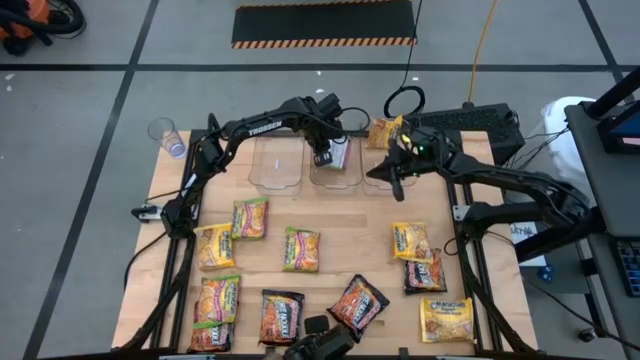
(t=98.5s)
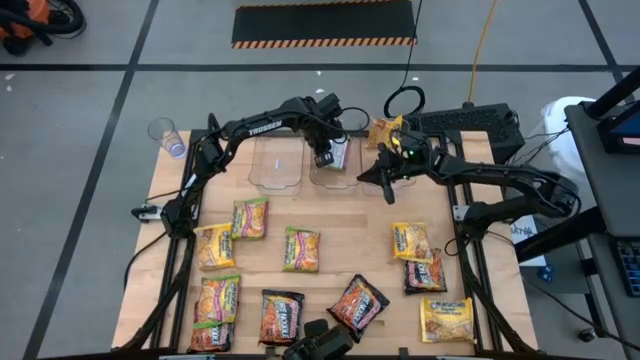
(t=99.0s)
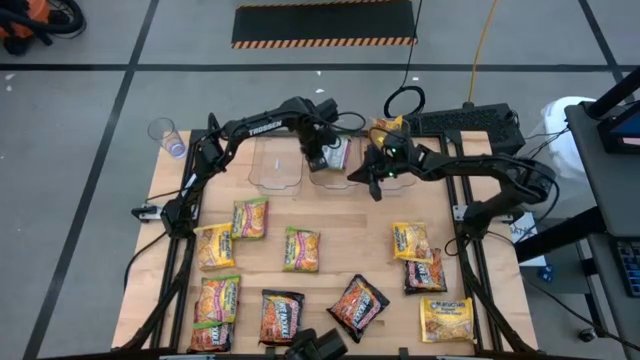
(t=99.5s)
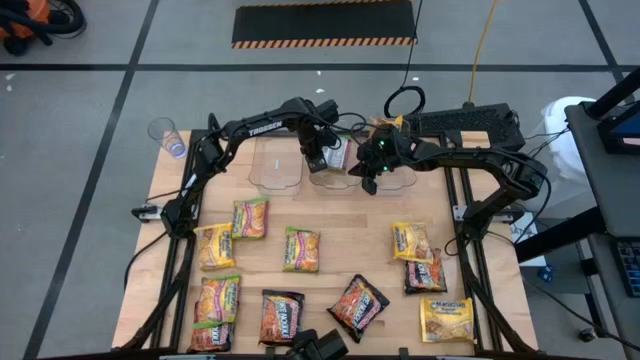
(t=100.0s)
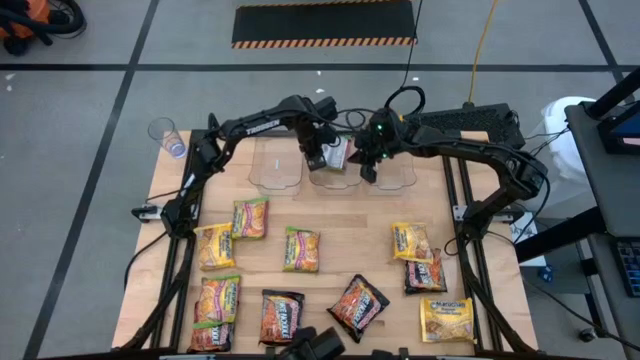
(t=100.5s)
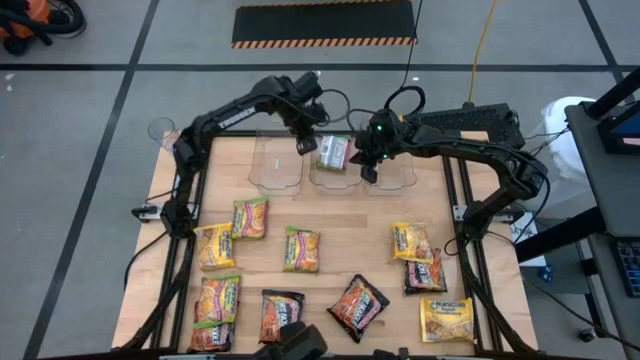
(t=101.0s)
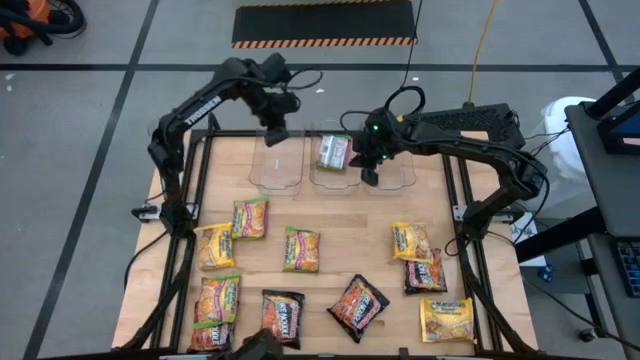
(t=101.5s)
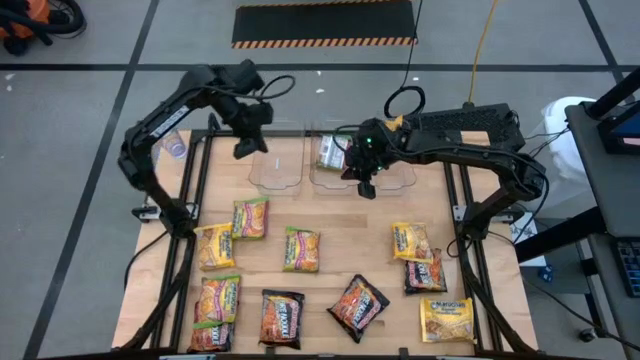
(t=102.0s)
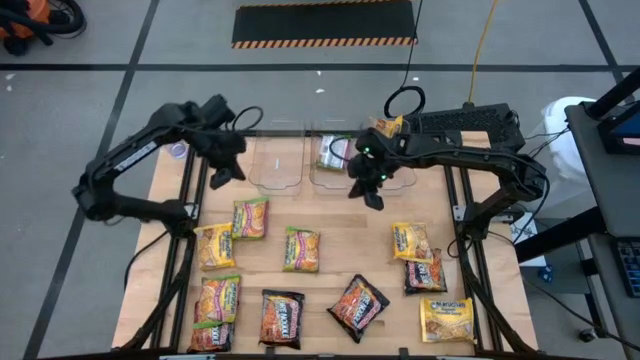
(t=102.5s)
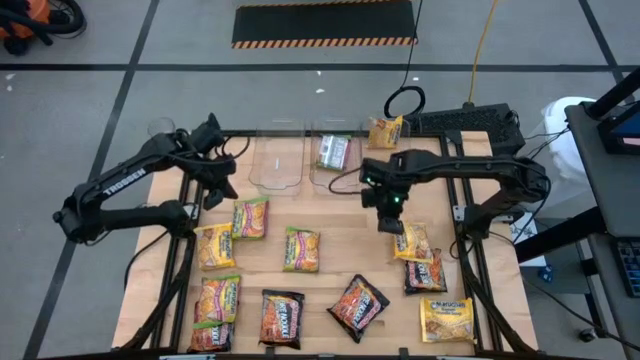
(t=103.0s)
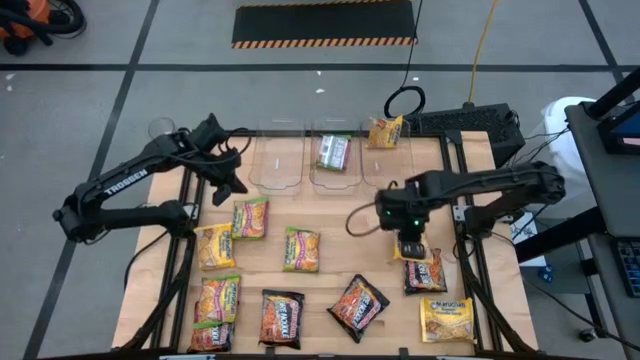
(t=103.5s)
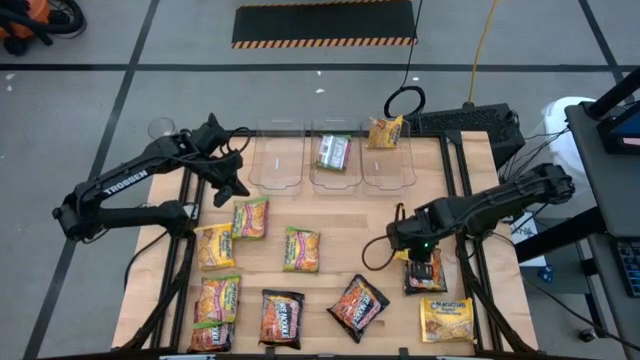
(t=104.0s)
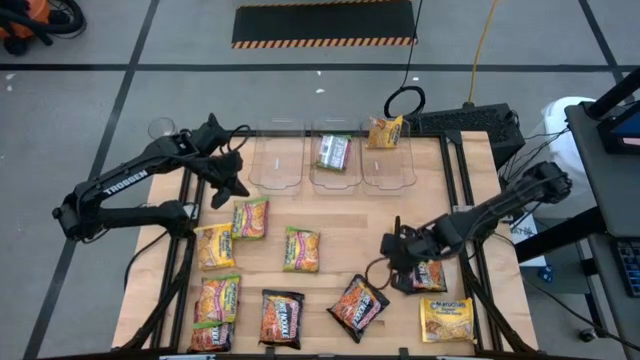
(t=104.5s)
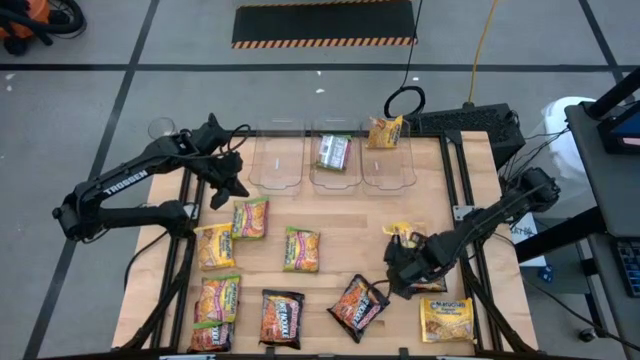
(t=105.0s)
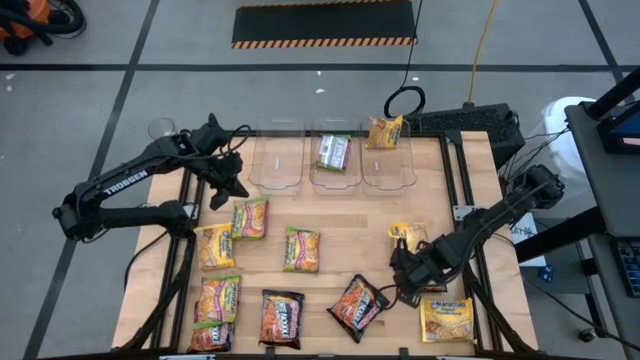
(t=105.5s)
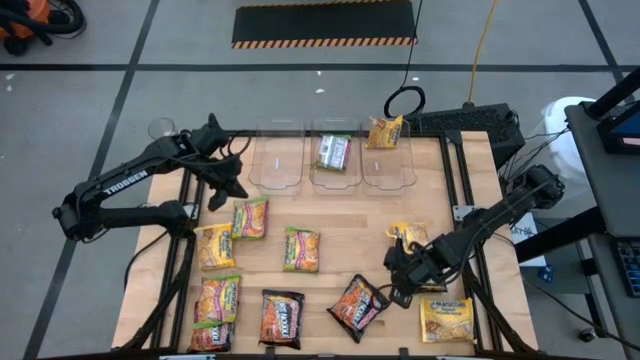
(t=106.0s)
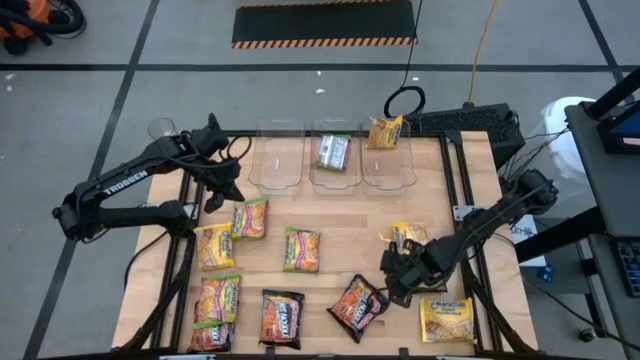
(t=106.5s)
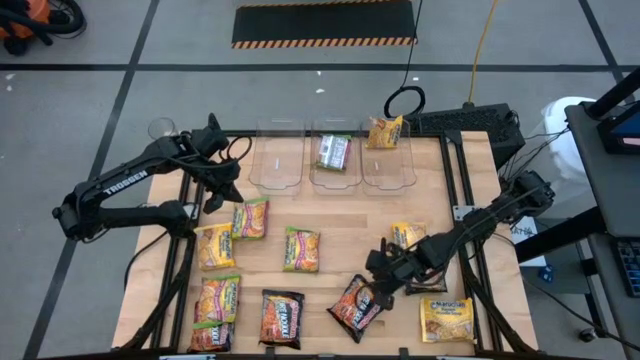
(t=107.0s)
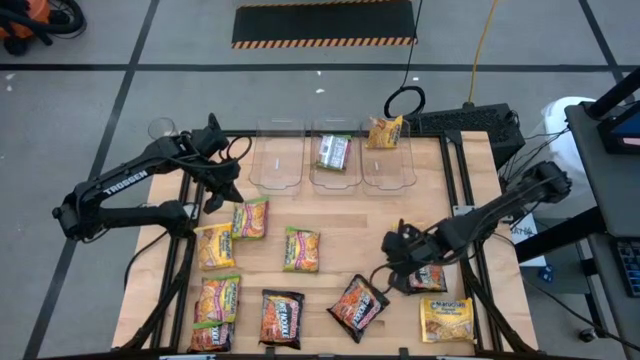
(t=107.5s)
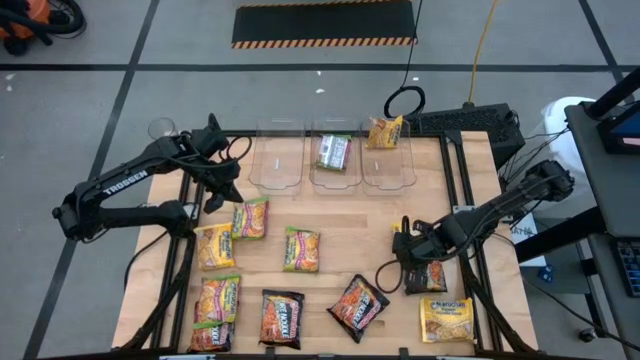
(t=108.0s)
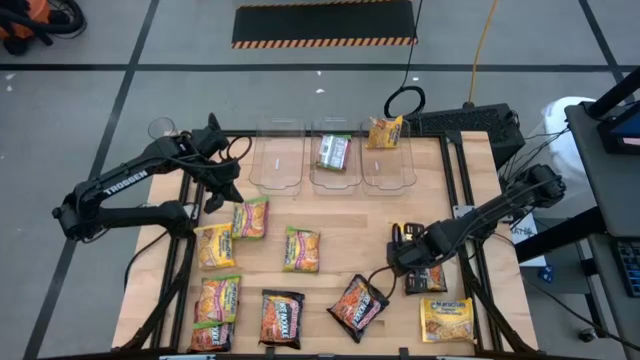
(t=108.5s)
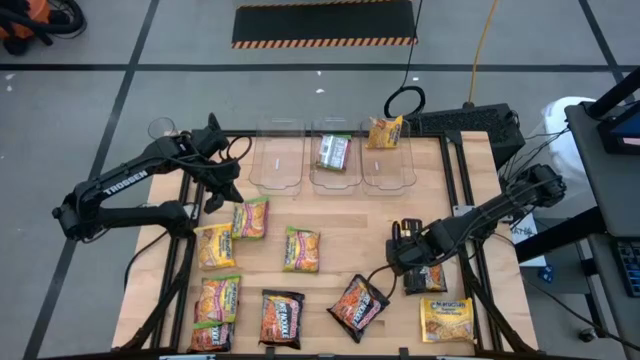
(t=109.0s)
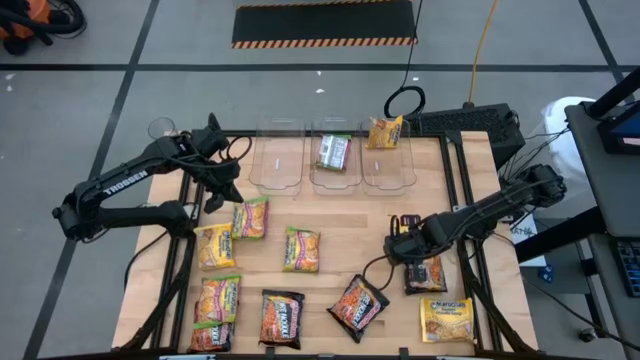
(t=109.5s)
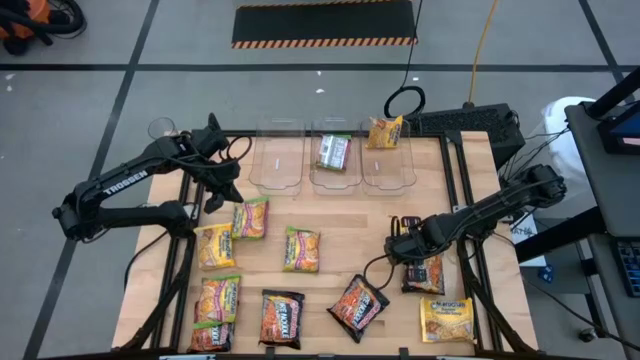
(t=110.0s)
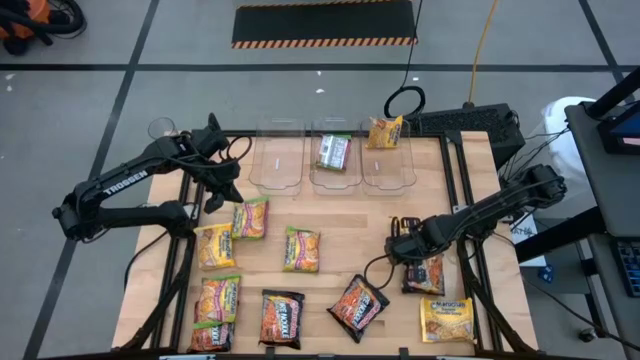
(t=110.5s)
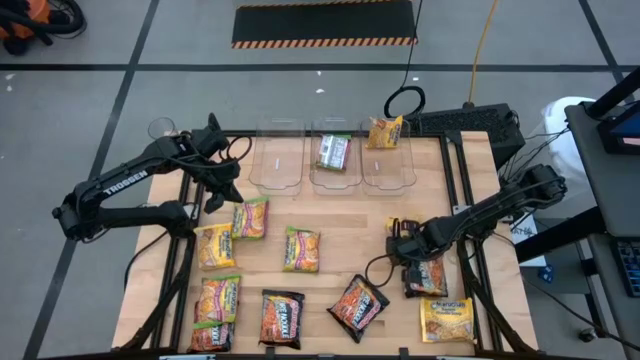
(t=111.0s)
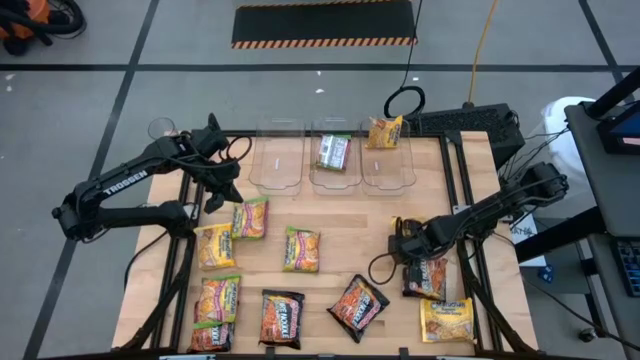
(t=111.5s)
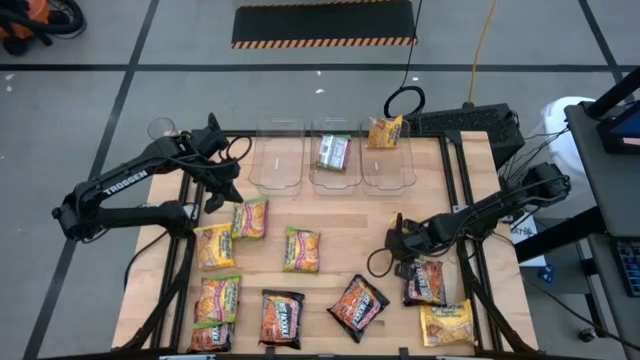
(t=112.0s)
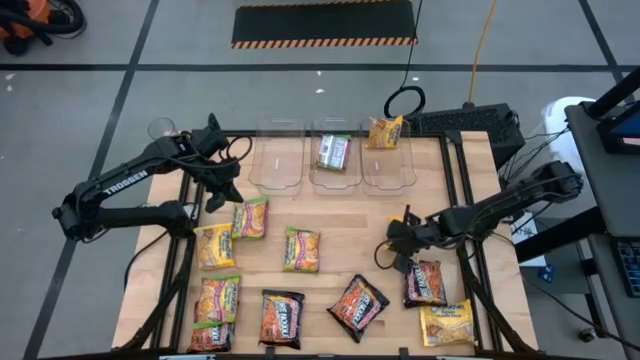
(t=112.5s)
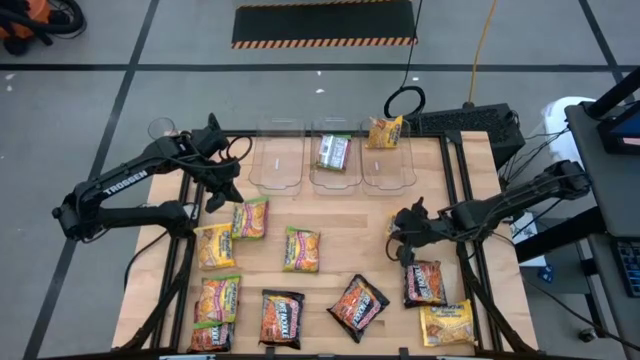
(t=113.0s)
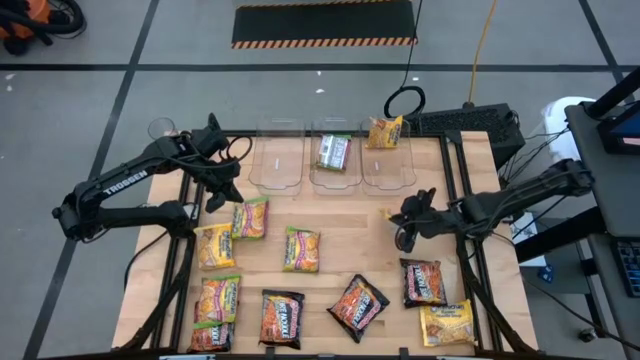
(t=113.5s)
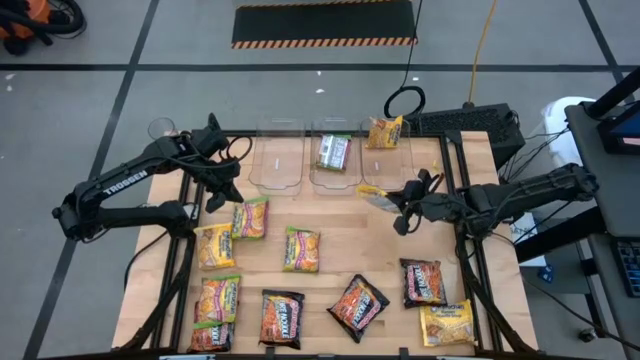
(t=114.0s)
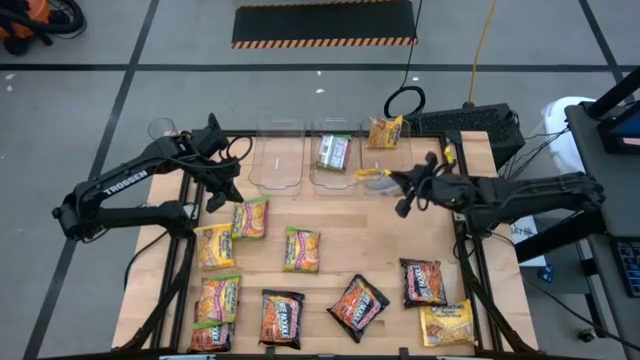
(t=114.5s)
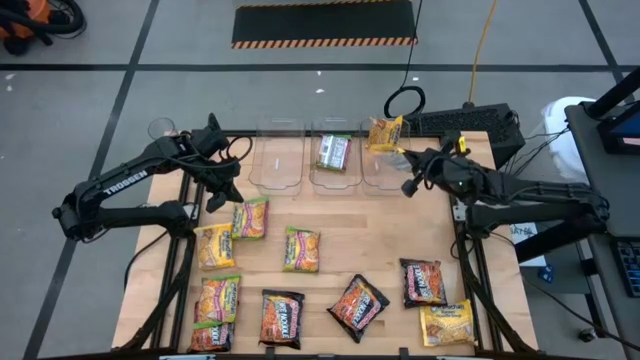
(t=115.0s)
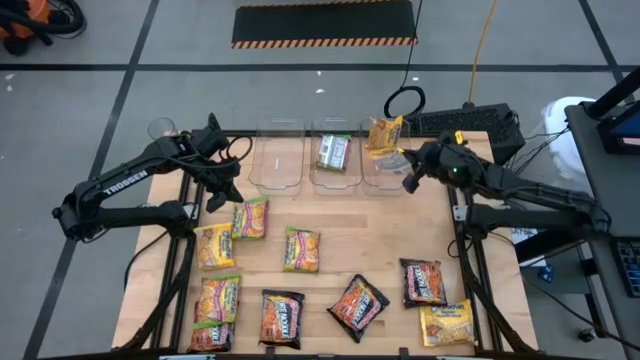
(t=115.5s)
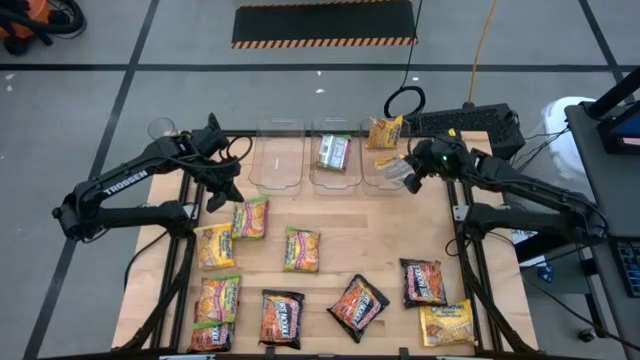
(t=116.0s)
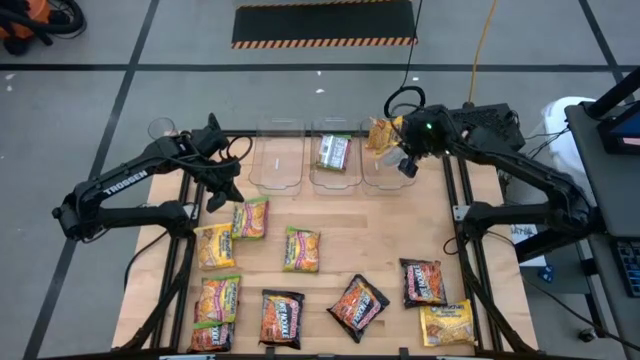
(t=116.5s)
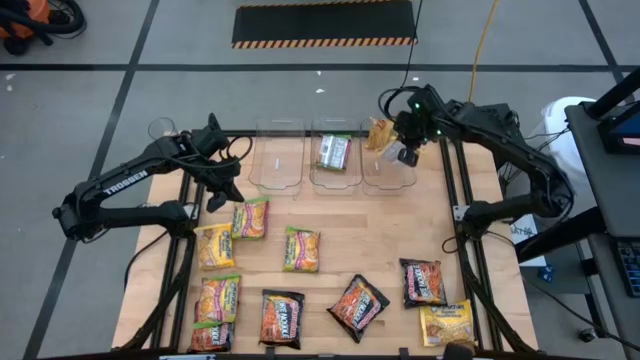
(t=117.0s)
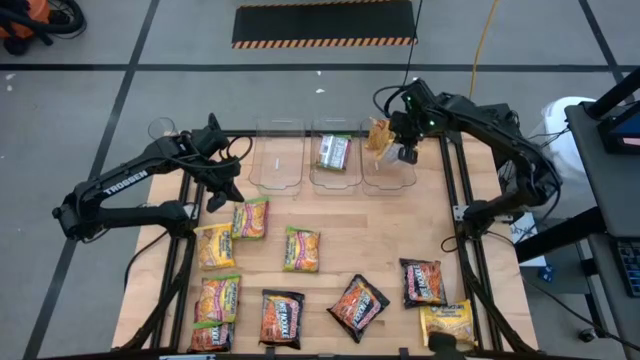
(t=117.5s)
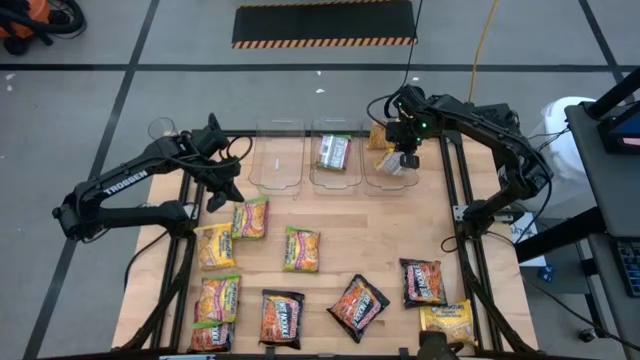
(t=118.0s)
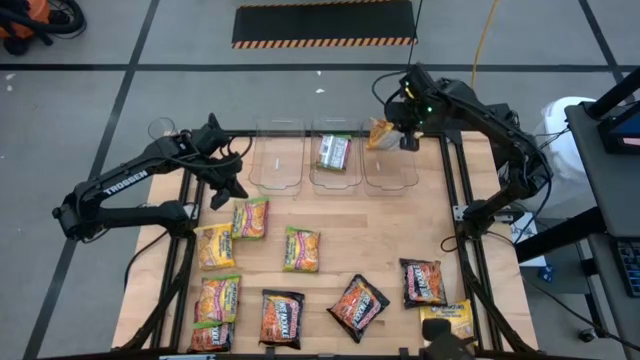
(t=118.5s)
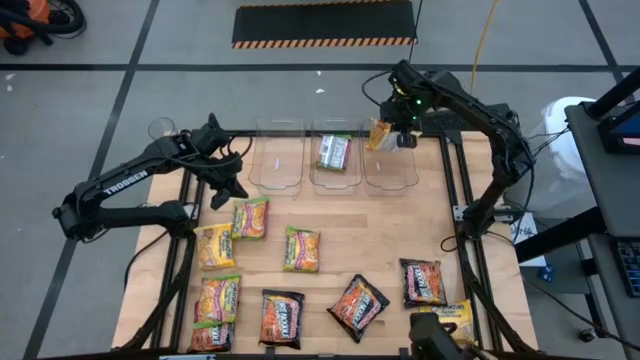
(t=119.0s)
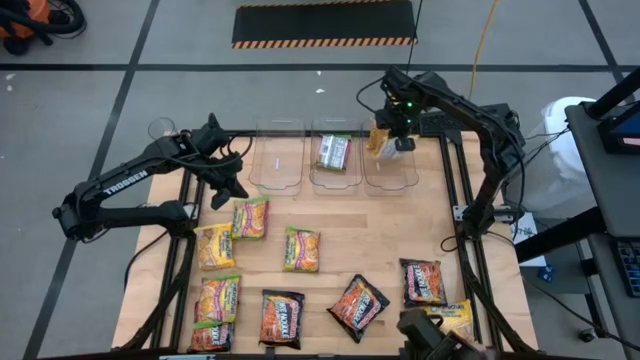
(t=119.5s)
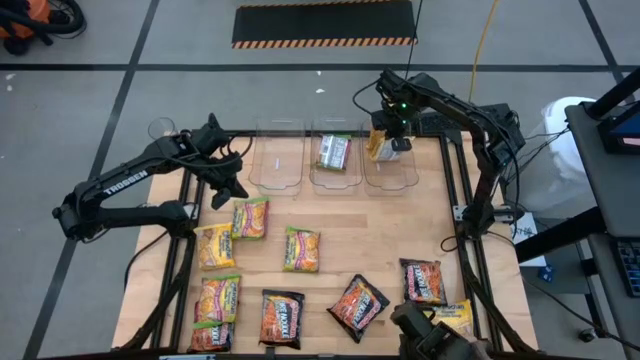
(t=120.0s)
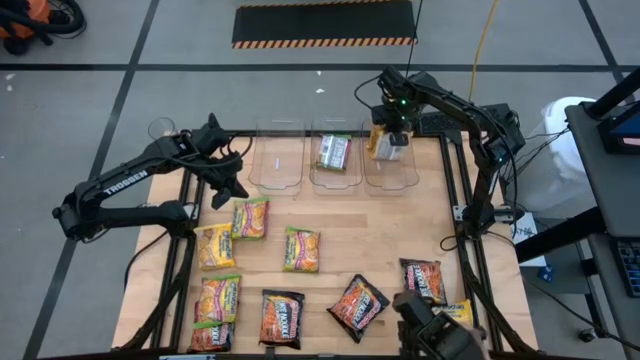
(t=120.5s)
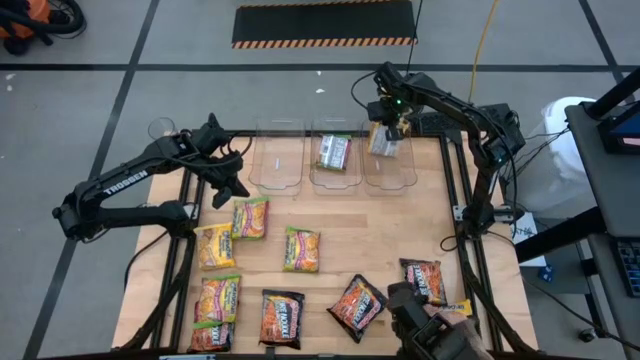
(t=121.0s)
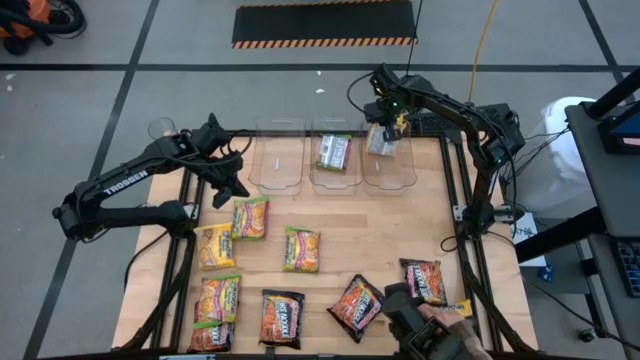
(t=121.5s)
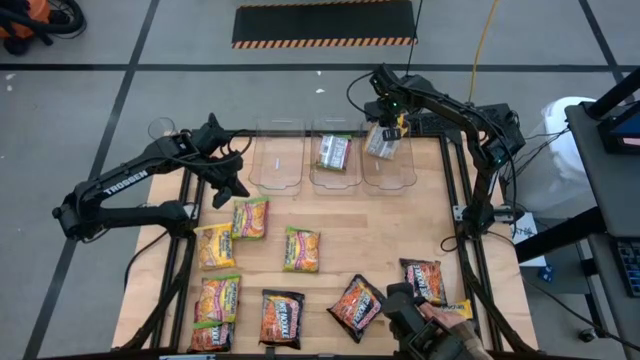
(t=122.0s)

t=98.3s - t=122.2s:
Task: Sort Maruchan noodles
Put the yellow noodle pack into the right transparent bin
